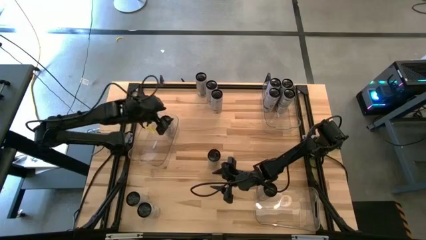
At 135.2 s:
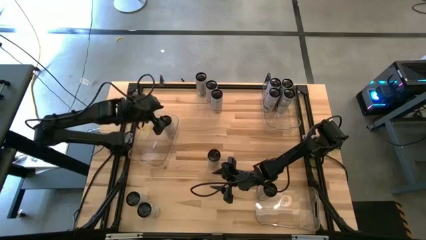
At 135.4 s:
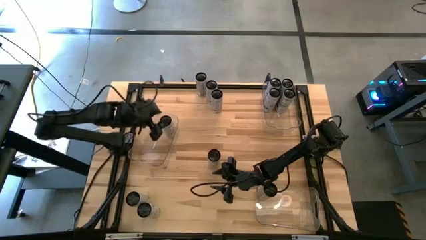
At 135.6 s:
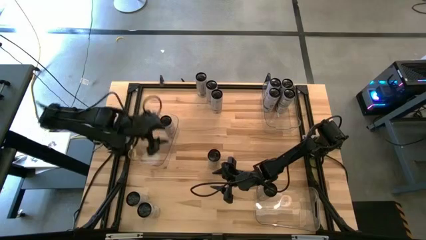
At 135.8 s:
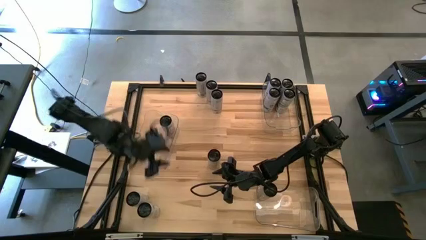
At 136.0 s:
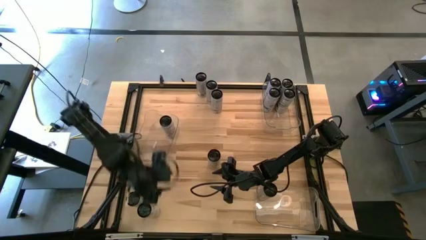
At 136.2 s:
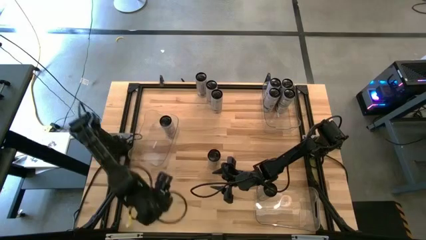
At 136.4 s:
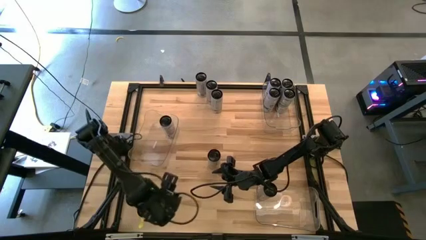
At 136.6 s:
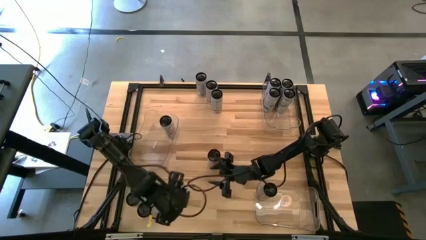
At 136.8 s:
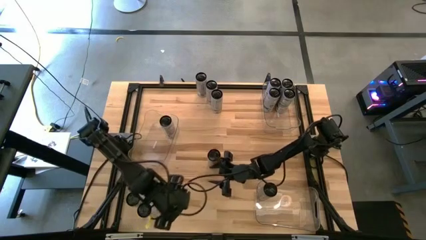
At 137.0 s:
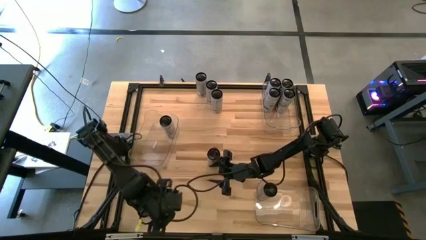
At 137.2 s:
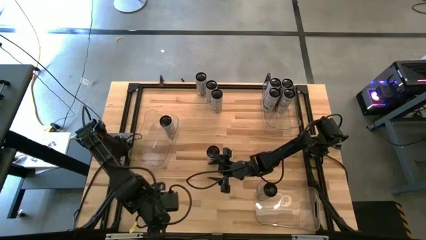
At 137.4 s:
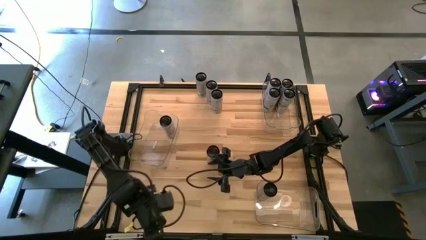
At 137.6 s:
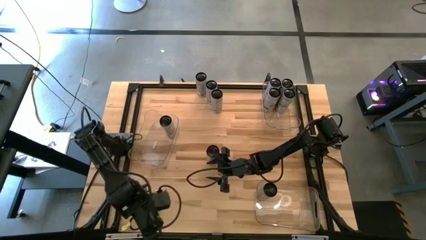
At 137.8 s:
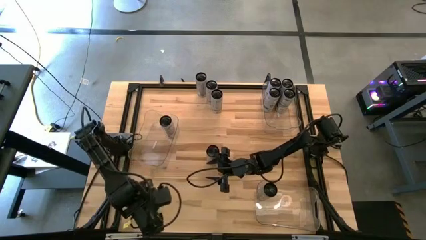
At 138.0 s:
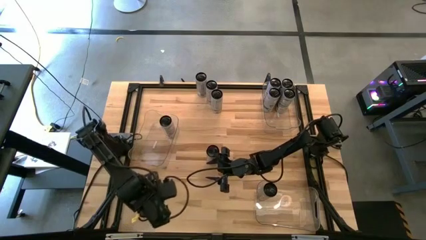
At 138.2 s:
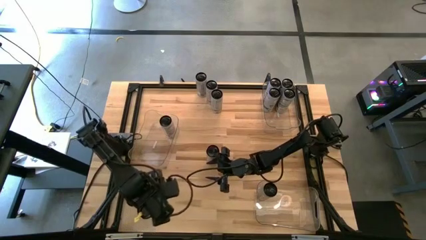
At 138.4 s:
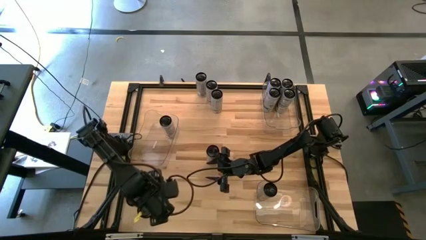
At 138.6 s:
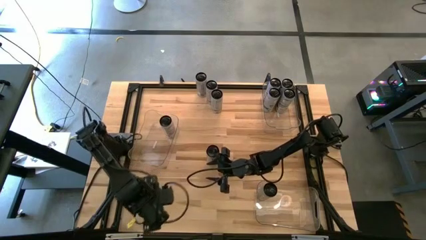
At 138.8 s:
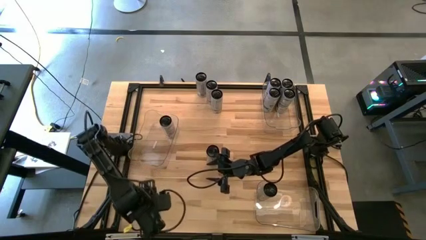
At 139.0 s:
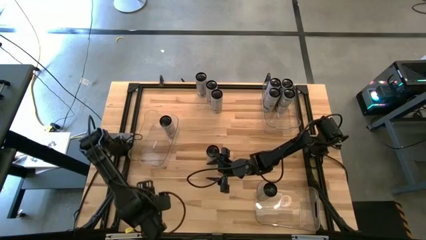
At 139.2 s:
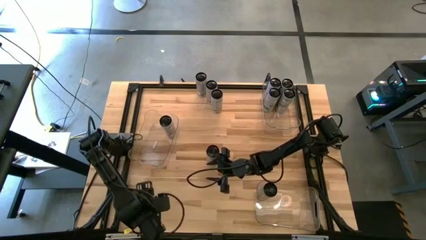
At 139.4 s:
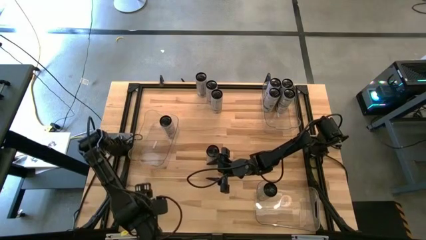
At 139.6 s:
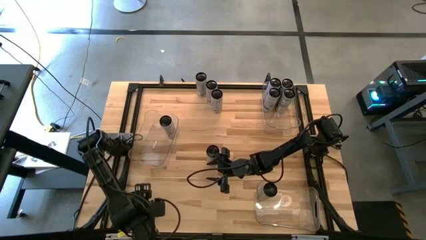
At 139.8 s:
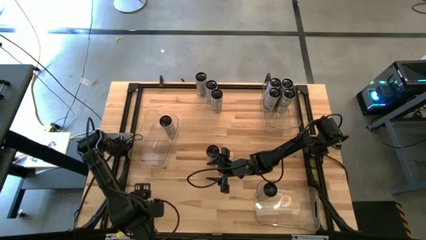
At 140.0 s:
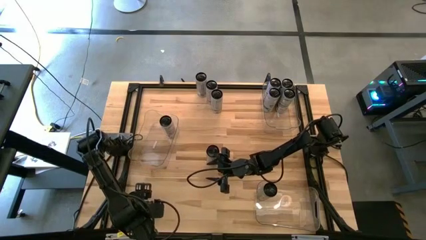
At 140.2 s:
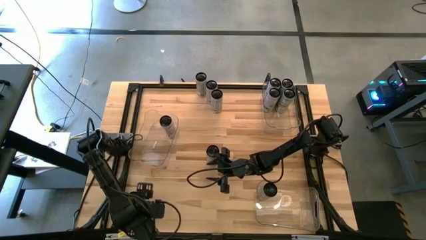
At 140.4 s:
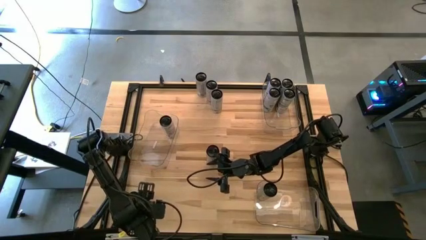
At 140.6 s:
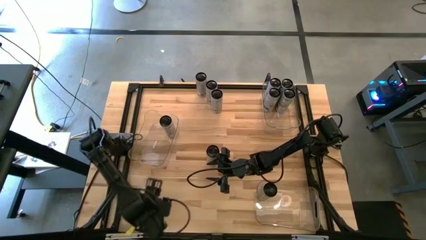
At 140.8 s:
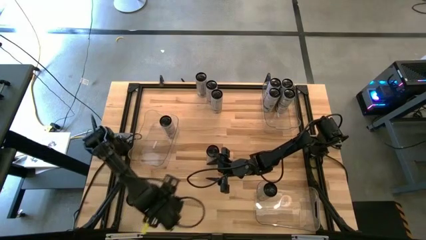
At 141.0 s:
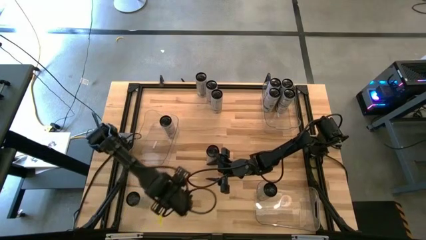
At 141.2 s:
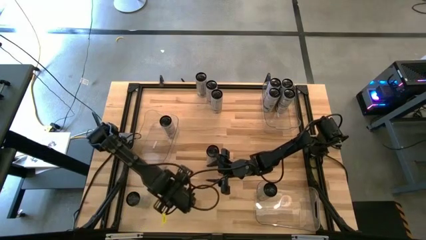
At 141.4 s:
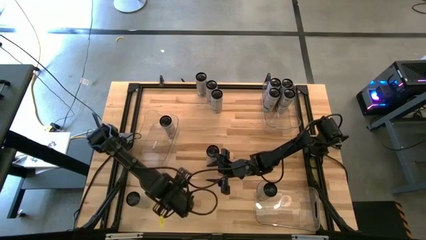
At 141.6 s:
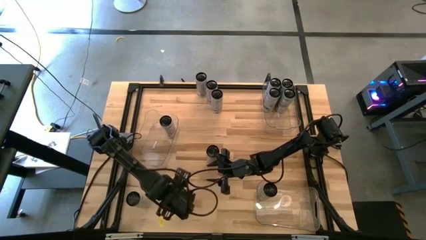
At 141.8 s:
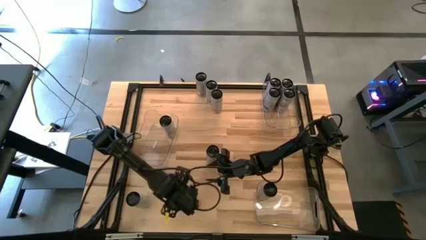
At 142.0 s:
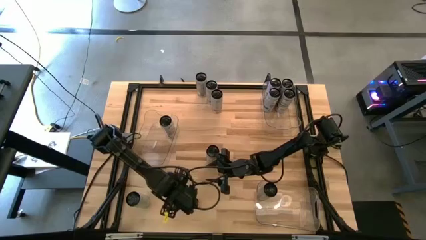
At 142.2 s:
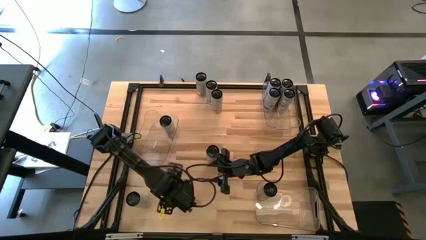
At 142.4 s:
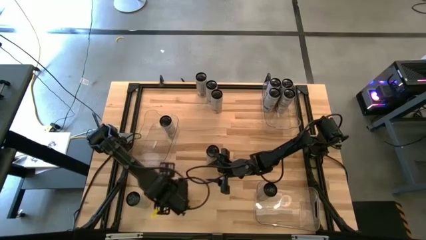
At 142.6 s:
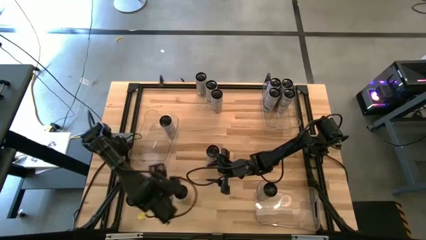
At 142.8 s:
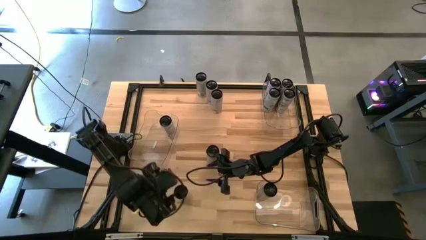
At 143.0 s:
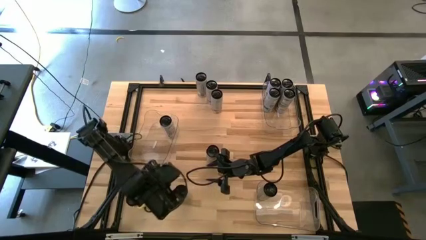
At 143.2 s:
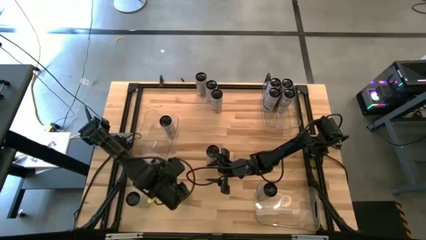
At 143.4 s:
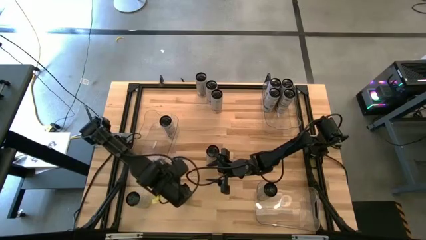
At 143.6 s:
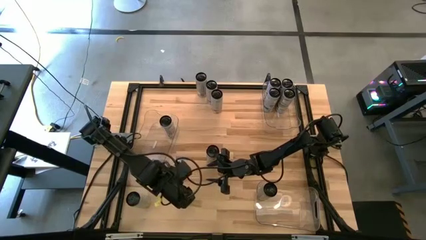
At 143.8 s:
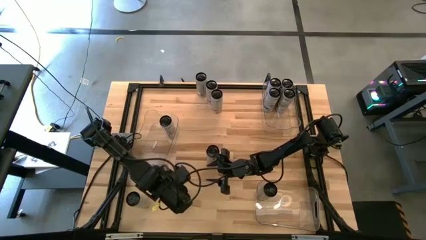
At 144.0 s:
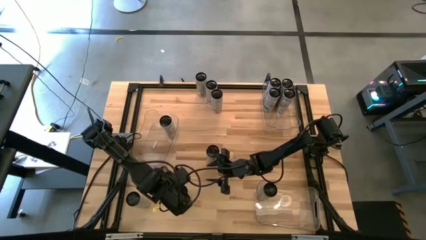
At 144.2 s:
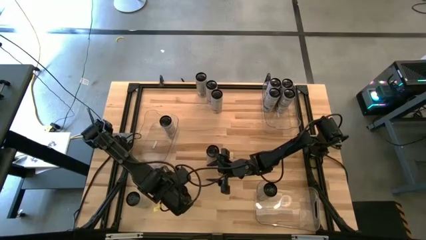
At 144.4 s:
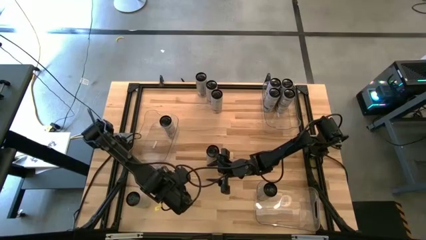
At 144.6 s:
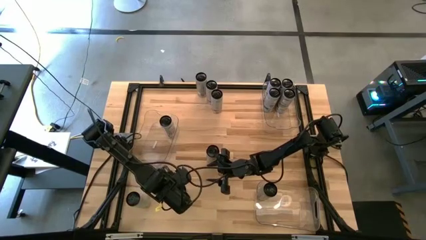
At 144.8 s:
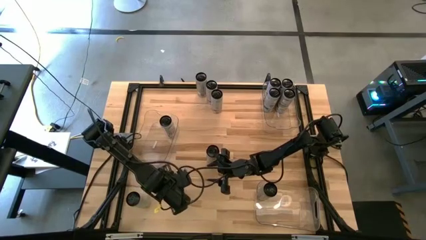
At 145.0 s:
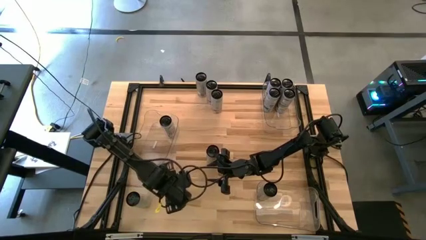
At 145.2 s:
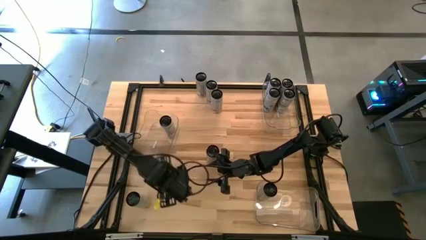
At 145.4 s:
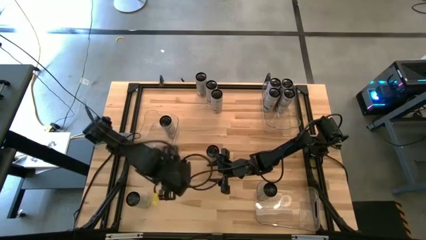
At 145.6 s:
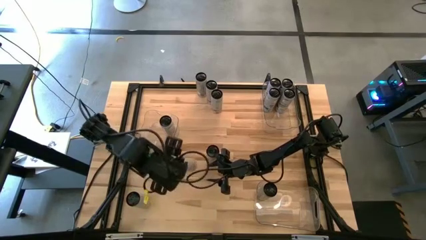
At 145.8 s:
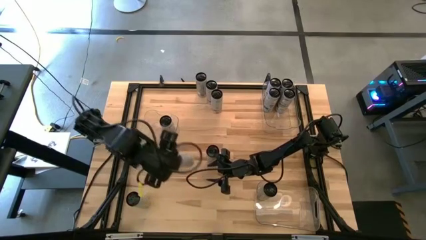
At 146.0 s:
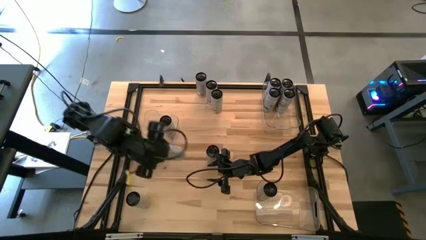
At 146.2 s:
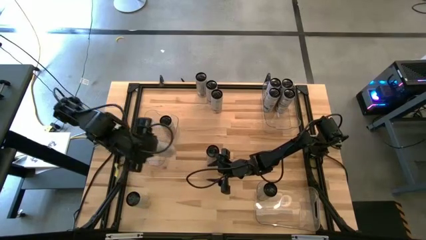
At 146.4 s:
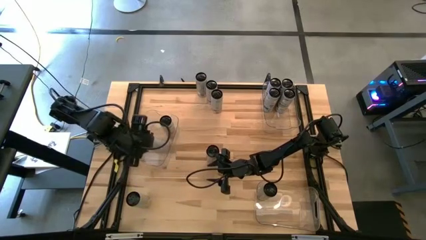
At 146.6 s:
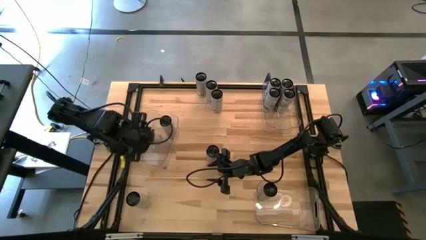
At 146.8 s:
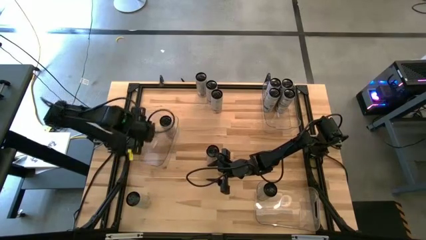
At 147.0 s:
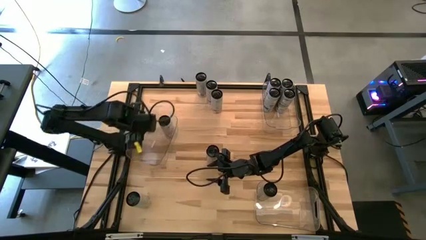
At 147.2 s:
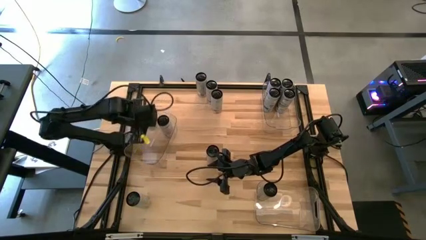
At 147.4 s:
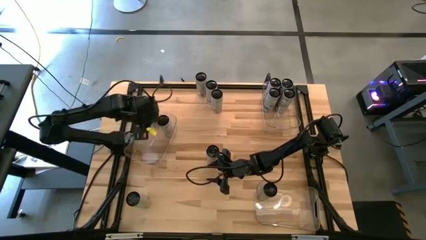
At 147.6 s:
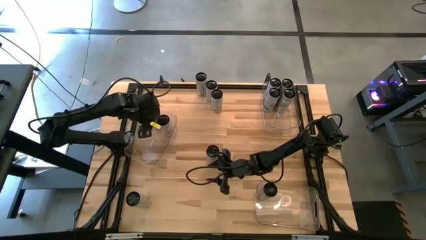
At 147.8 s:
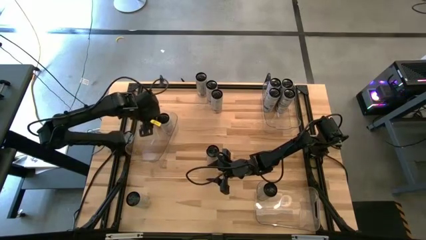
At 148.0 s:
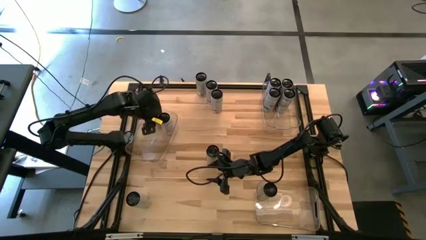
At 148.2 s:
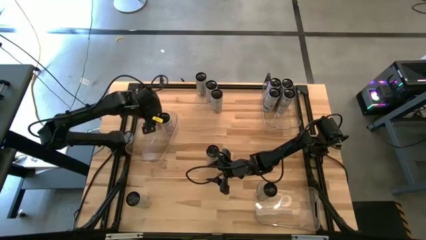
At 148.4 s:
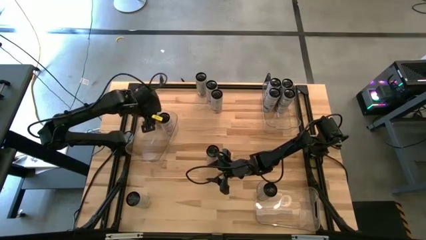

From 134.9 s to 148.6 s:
Task: Sort soda cans
Put the white-pink soda can into the middle transparent bin

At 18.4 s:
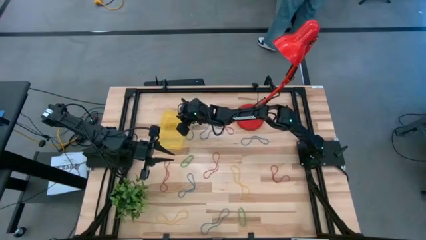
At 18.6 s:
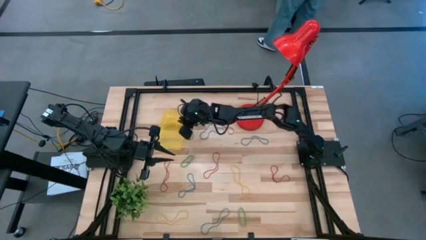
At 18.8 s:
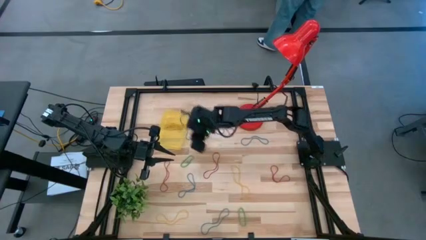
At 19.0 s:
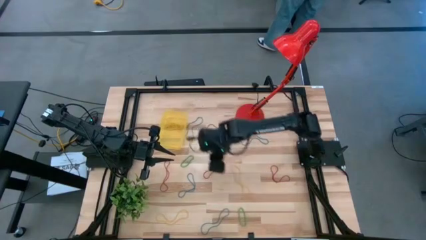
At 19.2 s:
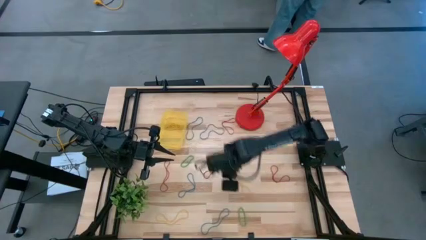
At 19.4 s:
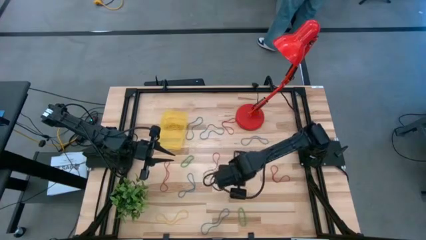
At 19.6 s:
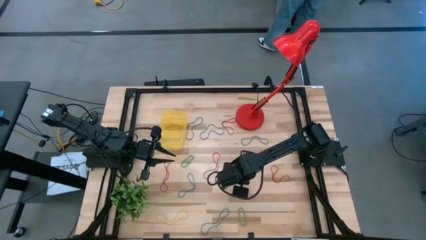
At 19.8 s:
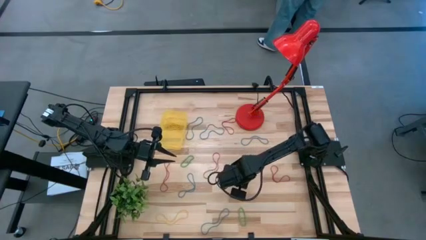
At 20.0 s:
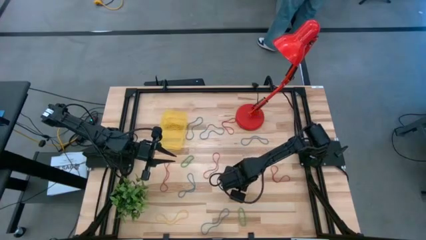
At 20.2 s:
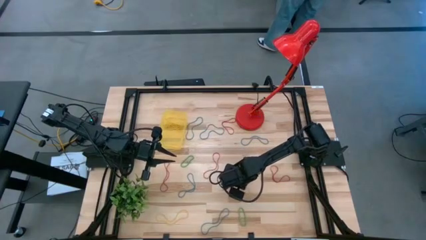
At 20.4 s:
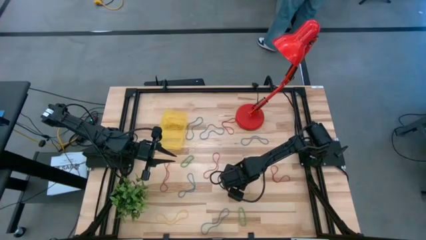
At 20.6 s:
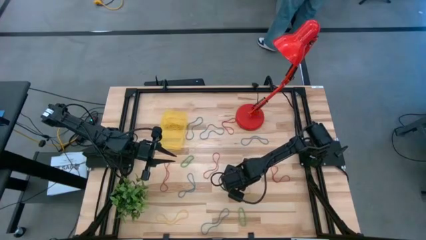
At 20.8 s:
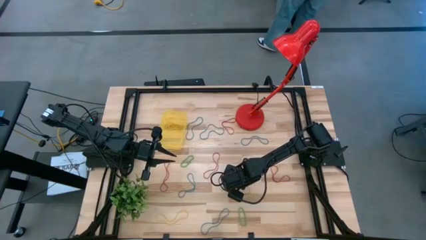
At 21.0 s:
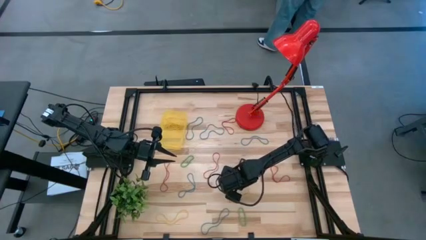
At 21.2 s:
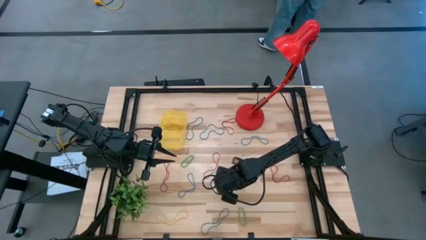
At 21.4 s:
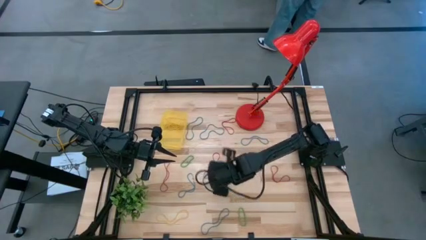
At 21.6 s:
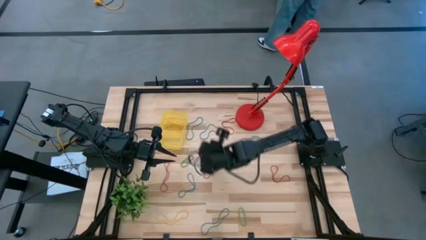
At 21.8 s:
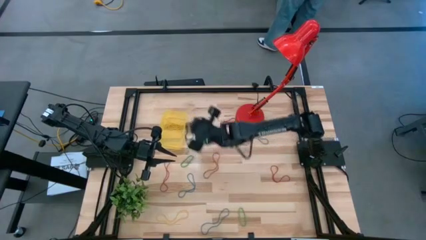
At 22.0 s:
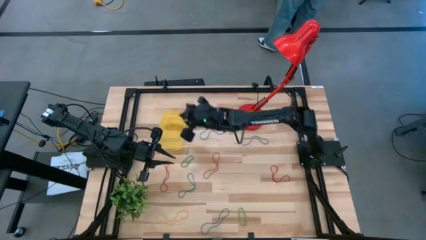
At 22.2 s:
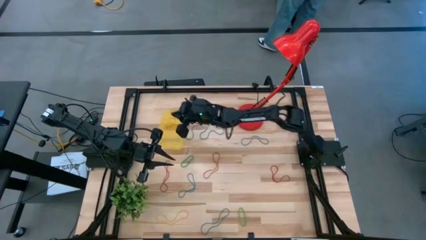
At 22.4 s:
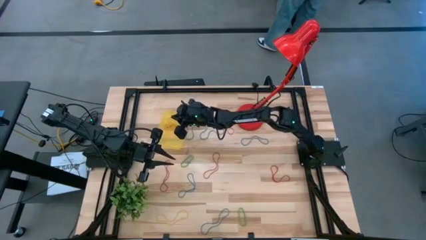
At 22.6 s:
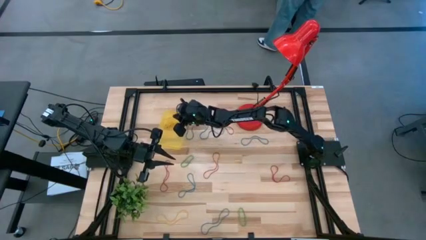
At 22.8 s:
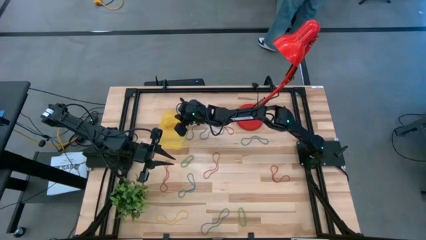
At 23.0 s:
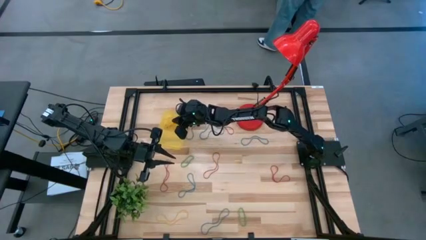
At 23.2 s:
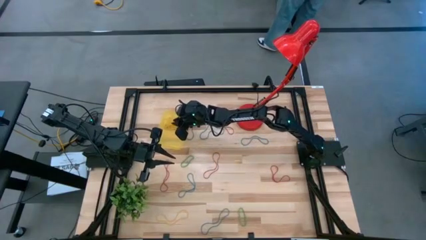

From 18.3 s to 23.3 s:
Task: Pick and place items into bin
Put the yellow rubber band into the yellow bin
